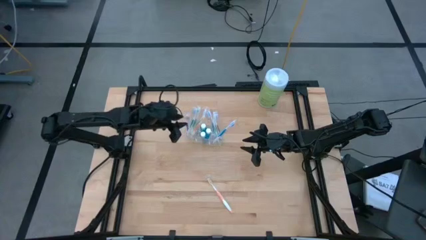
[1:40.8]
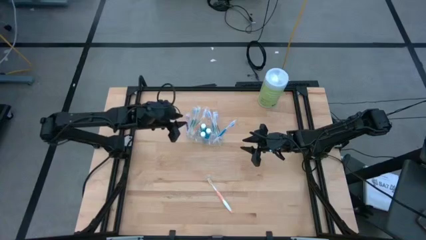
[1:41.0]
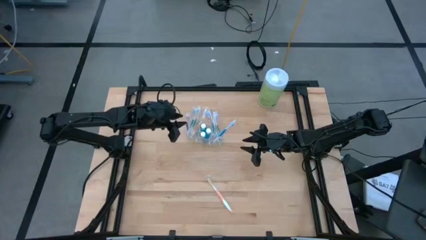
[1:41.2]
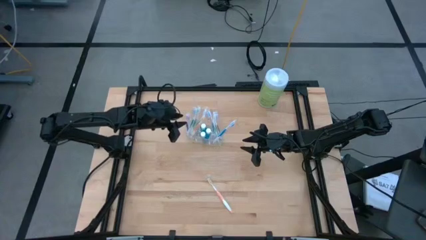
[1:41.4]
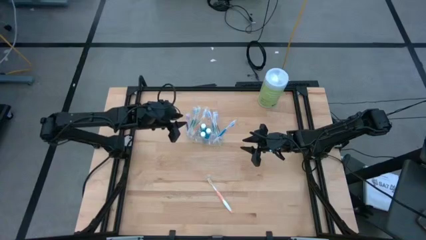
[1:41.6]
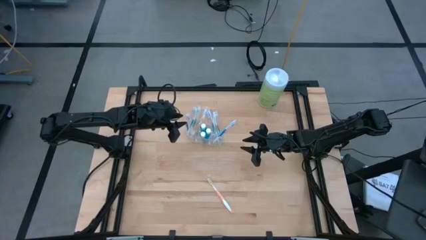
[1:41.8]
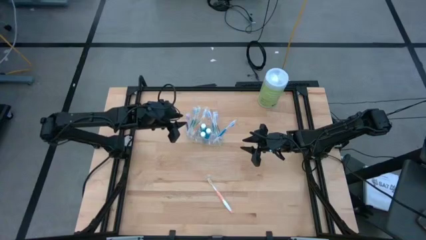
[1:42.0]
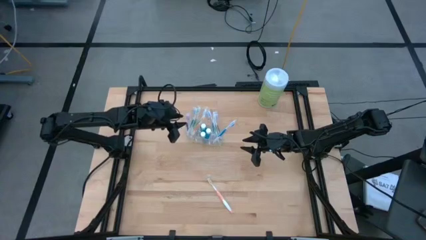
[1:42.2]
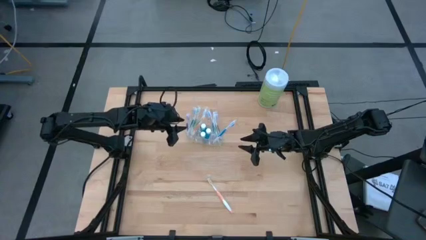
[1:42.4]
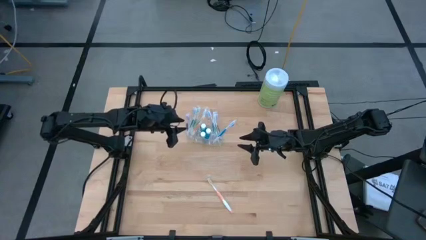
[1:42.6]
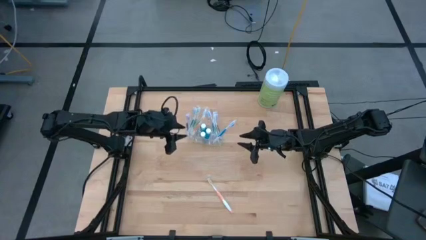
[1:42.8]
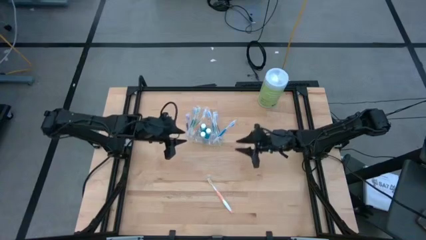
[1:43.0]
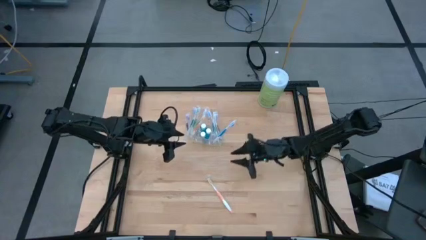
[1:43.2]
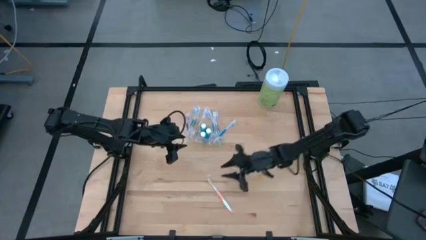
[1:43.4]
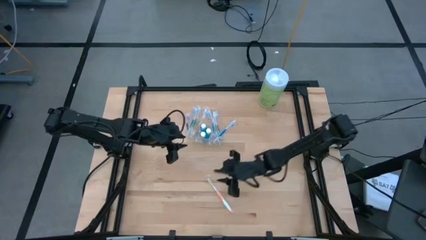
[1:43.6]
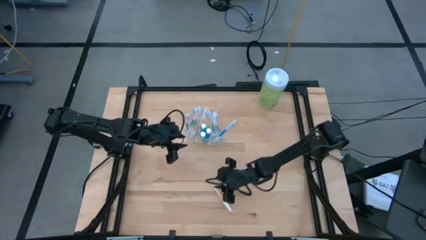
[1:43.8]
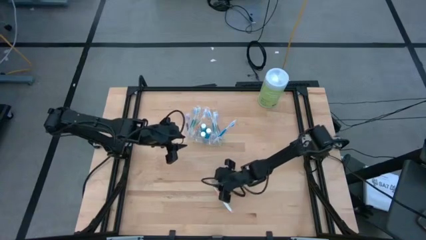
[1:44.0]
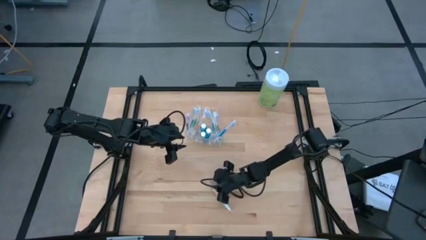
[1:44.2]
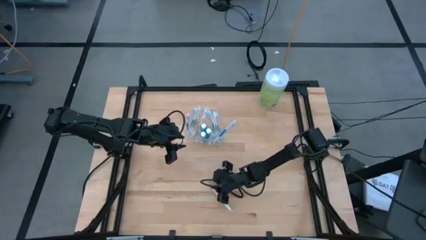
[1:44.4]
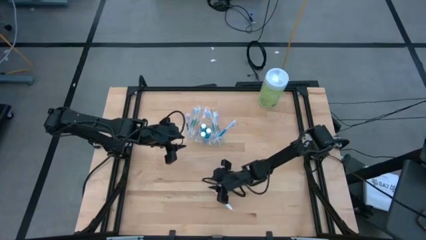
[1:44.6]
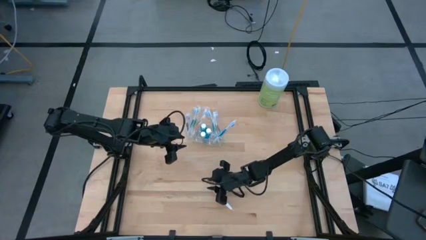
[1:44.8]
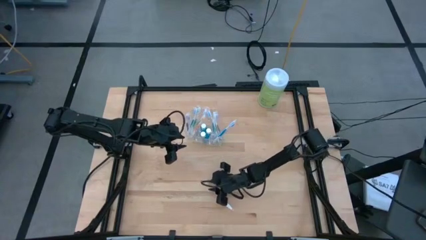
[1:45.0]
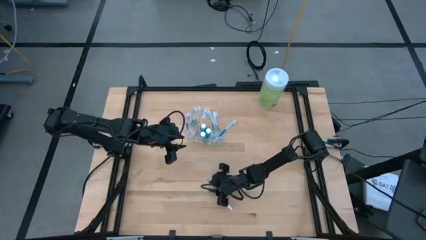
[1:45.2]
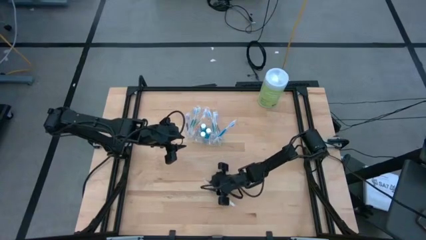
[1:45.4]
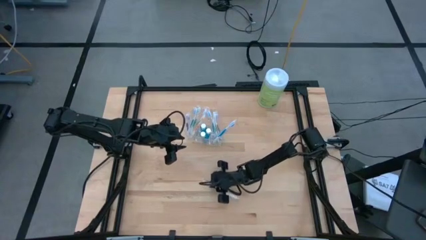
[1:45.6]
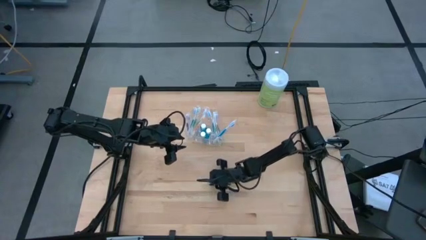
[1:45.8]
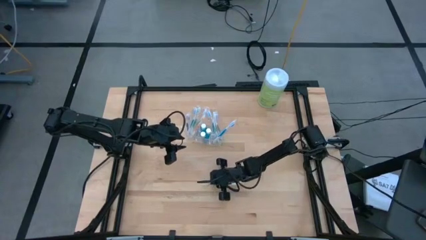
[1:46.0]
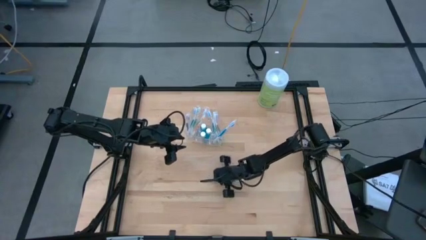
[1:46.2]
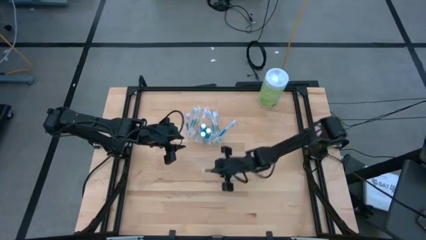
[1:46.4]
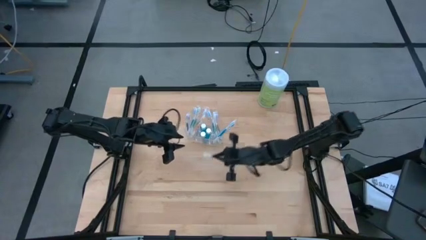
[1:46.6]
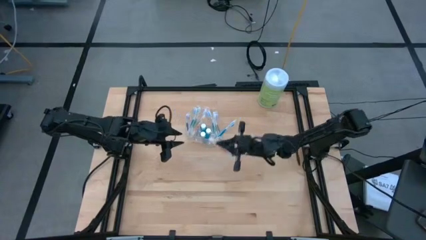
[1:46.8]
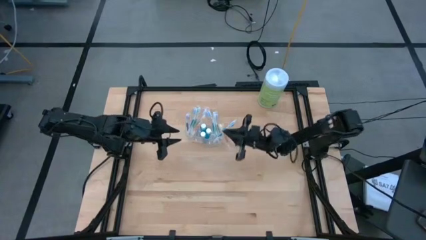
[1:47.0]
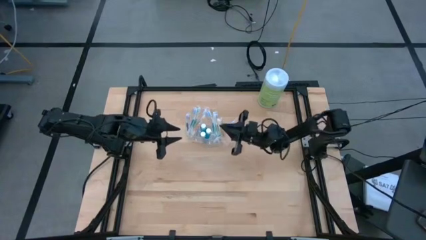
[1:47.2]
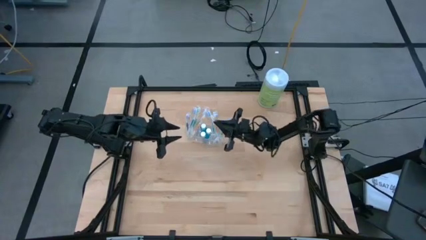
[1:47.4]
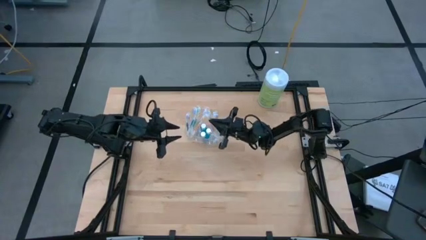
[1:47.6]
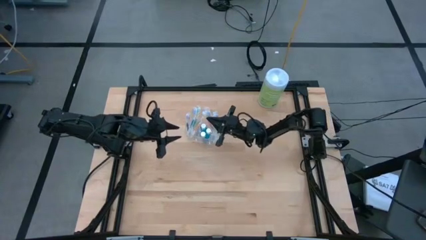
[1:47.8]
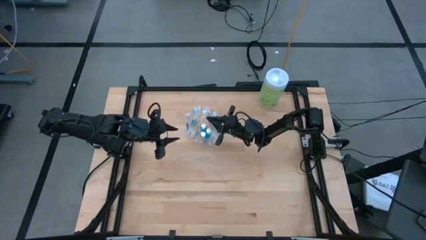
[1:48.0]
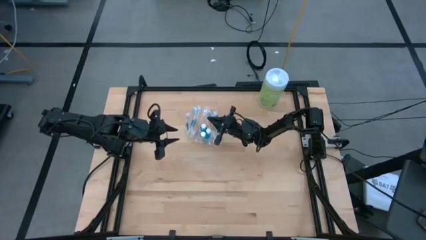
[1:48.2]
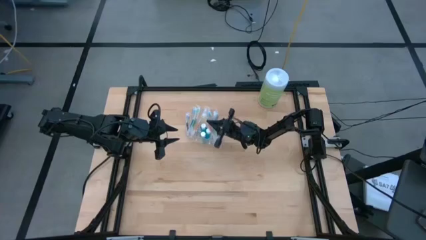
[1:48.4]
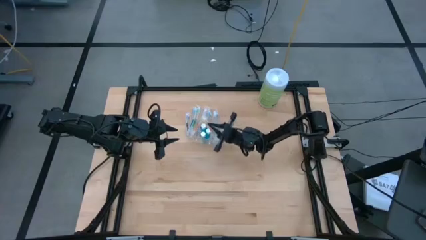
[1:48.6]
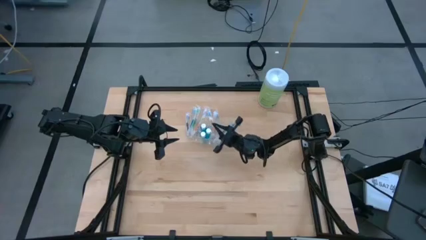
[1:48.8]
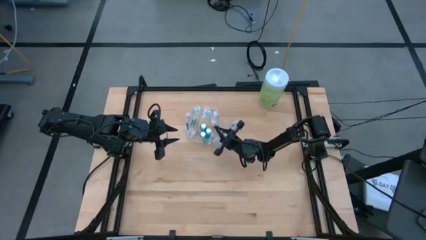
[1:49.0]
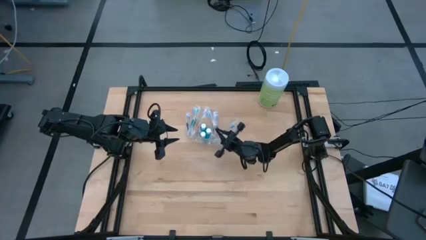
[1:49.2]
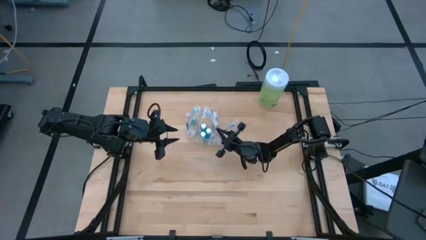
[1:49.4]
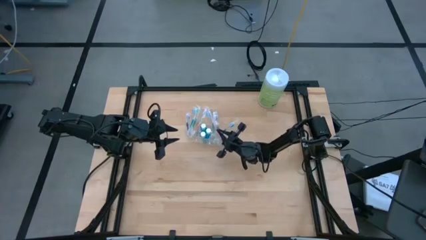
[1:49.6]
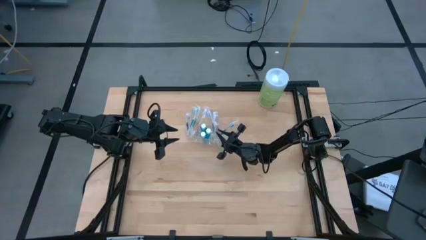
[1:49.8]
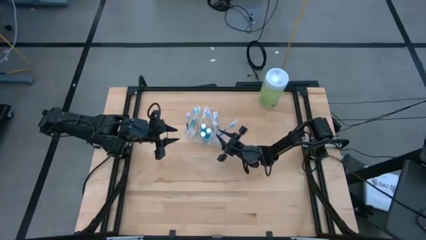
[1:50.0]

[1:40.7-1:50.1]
Task: Pick & Place toothbrushing station
Put the orange toothbrush into the transparent organizer

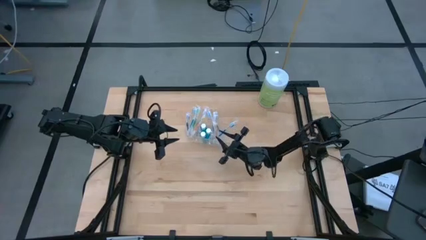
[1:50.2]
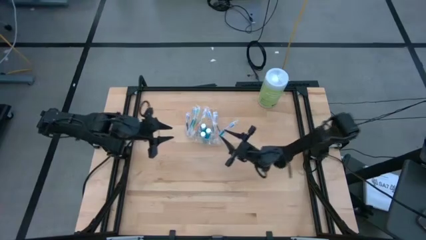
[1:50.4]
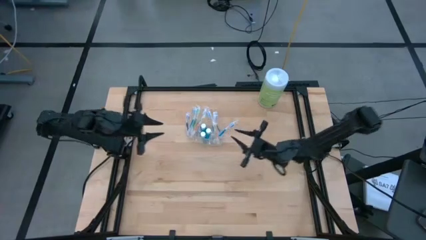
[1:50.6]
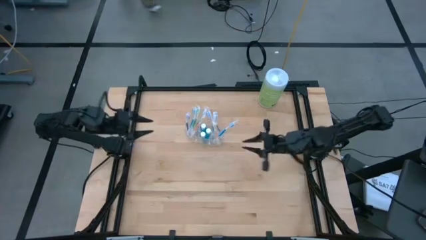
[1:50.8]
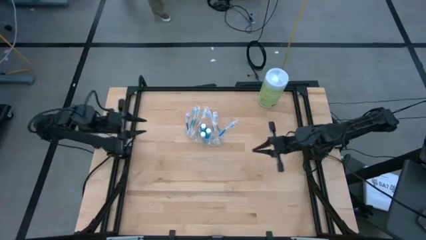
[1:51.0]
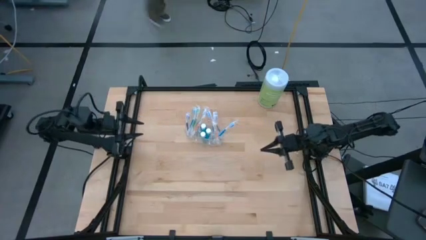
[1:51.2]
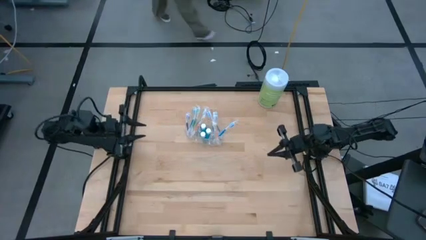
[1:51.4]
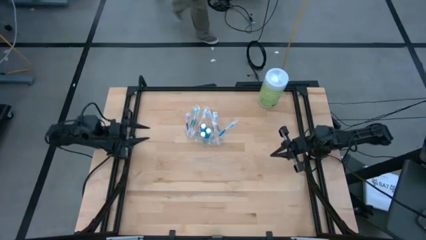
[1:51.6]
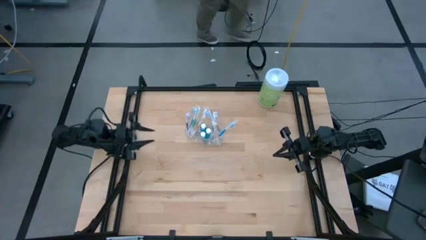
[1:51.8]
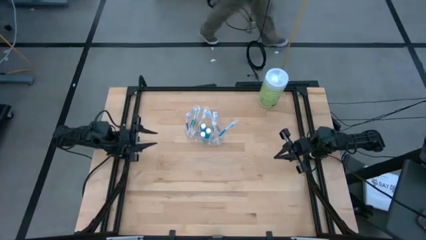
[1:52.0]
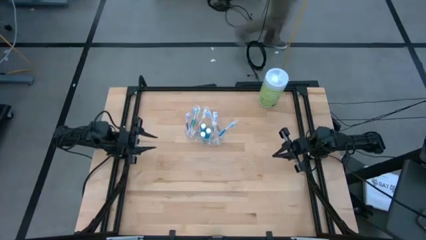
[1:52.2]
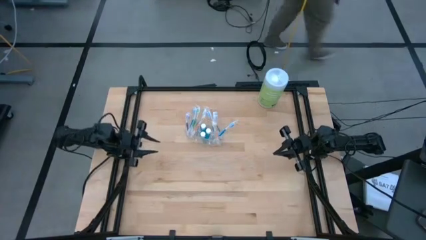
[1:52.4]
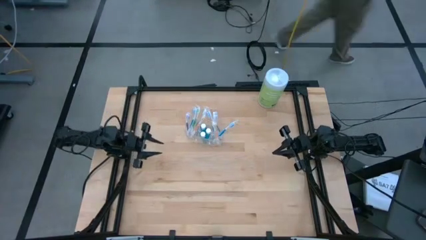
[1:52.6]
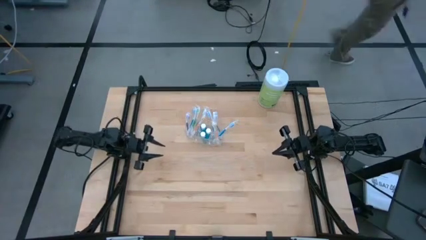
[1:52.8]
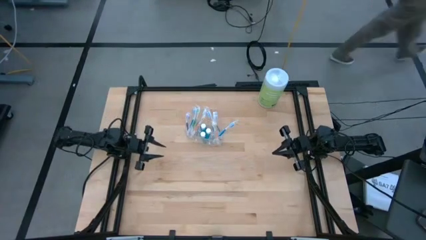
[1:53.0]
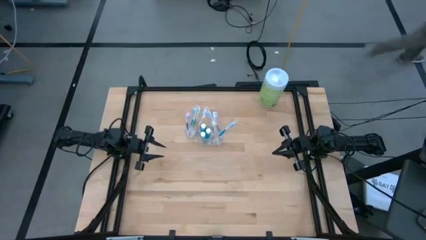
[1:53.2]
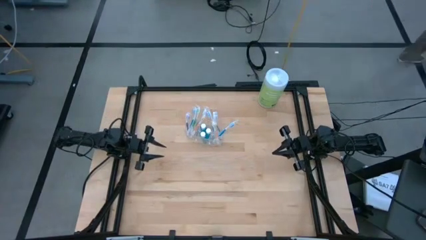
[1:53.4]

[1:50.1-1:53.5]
Return to home position
